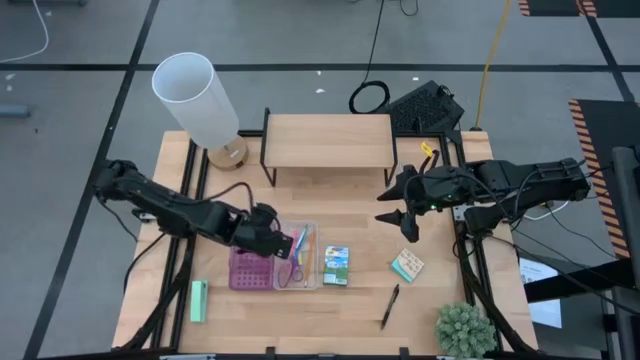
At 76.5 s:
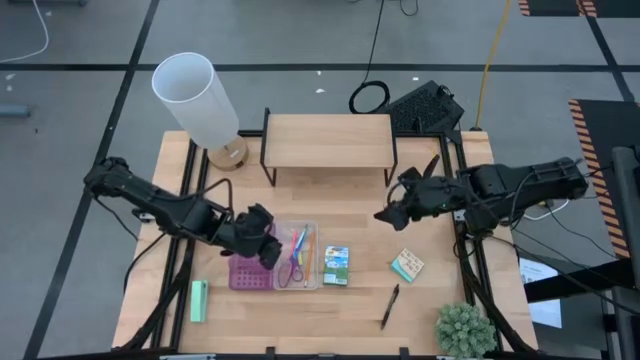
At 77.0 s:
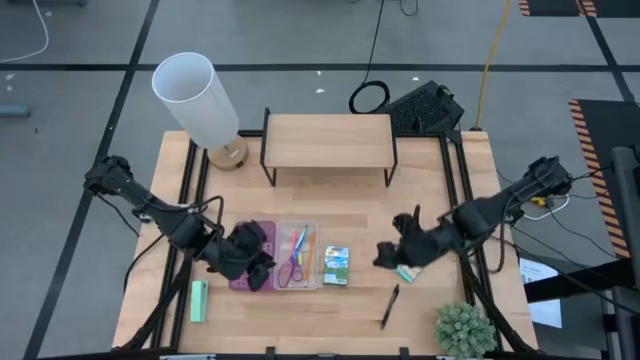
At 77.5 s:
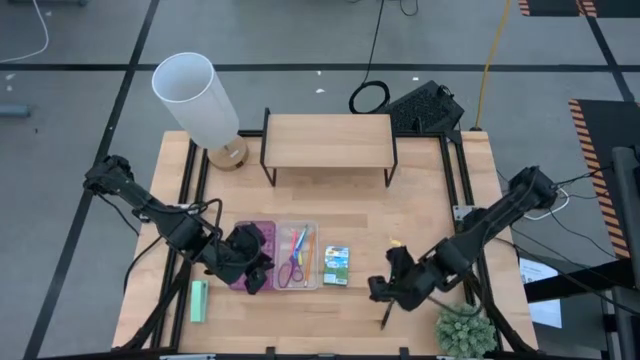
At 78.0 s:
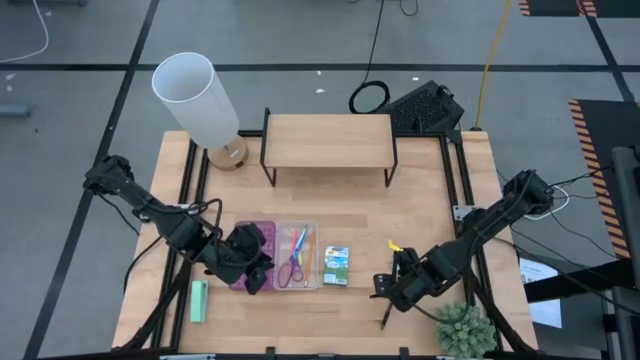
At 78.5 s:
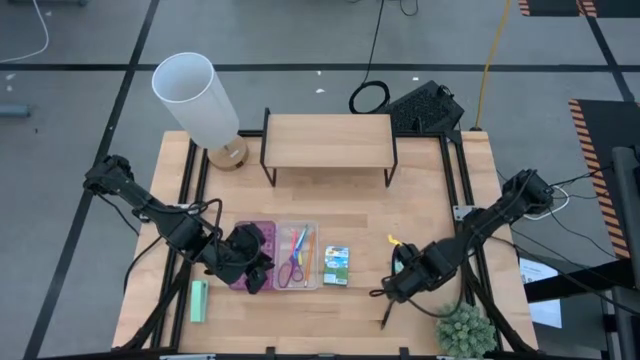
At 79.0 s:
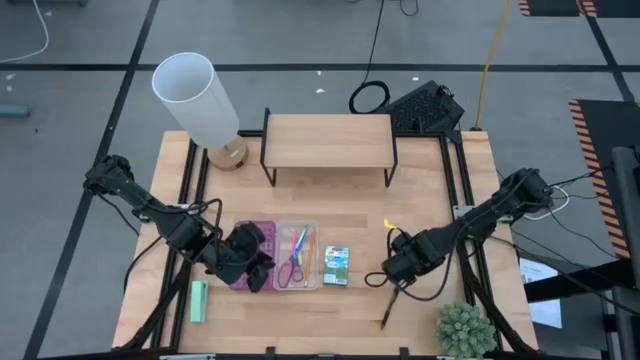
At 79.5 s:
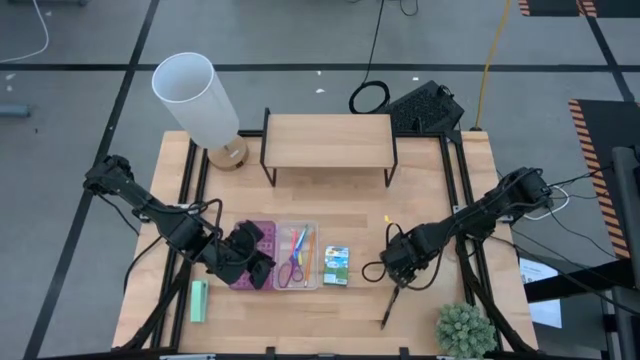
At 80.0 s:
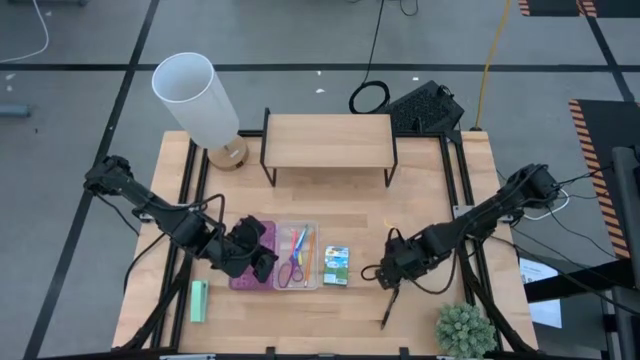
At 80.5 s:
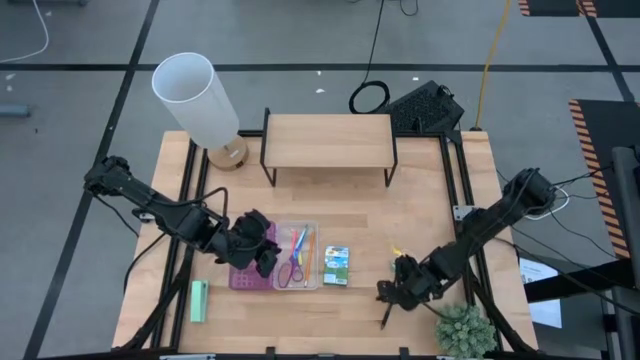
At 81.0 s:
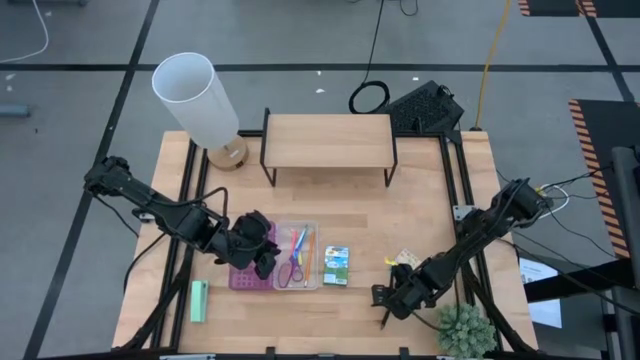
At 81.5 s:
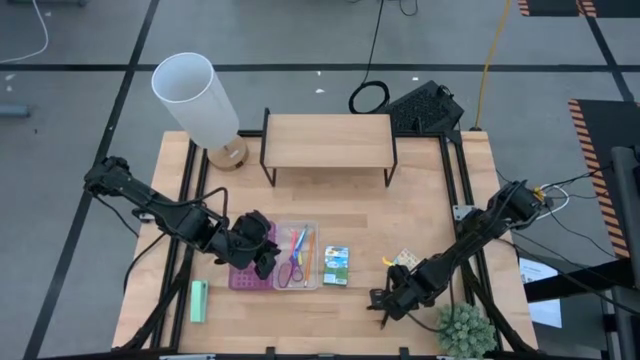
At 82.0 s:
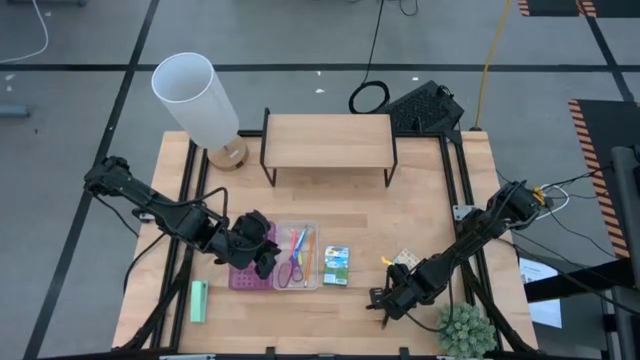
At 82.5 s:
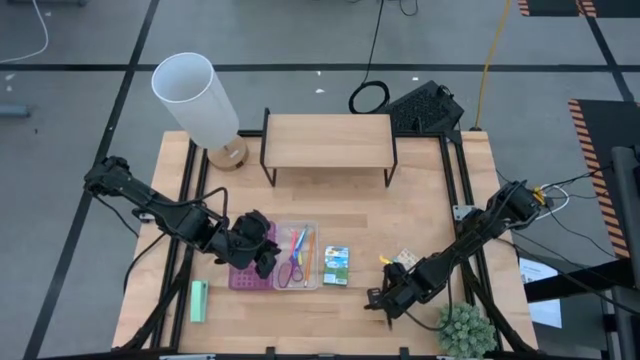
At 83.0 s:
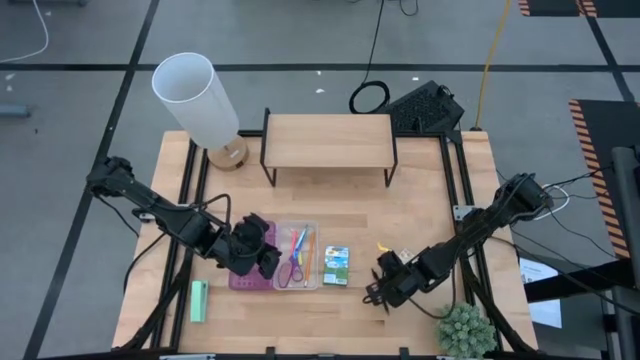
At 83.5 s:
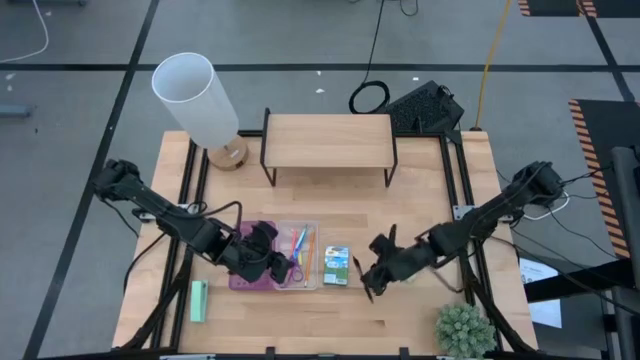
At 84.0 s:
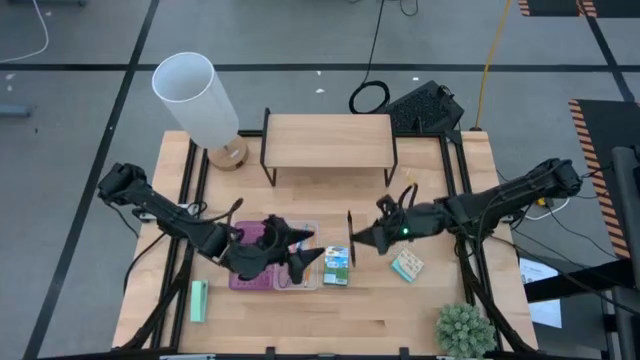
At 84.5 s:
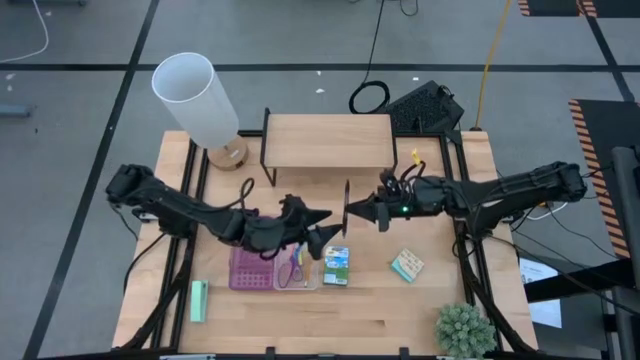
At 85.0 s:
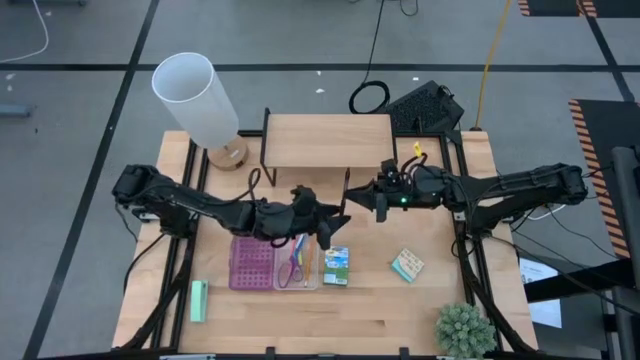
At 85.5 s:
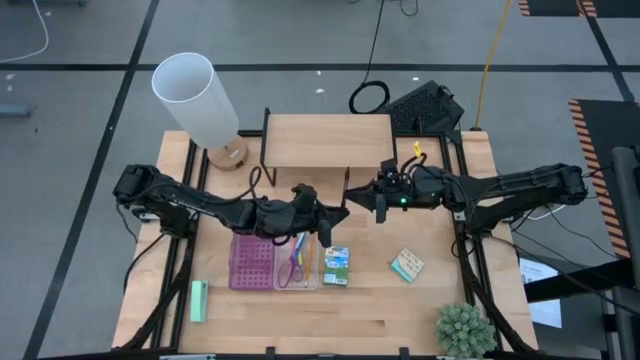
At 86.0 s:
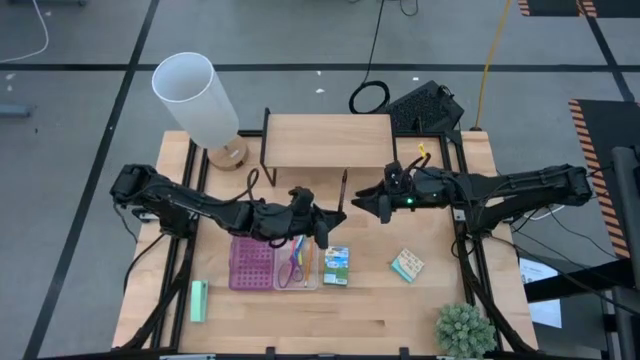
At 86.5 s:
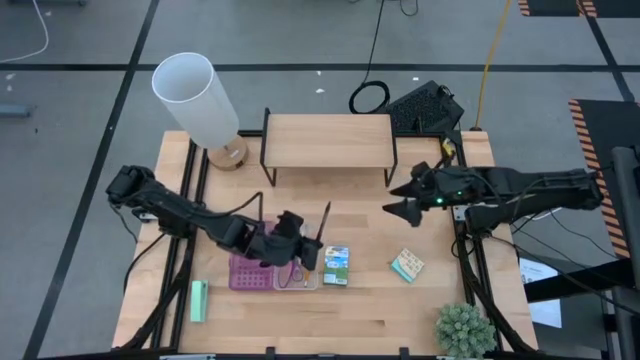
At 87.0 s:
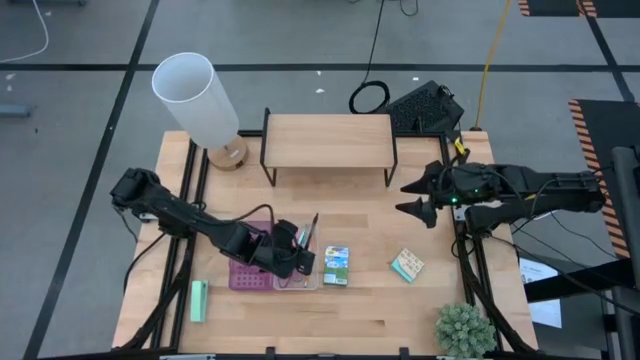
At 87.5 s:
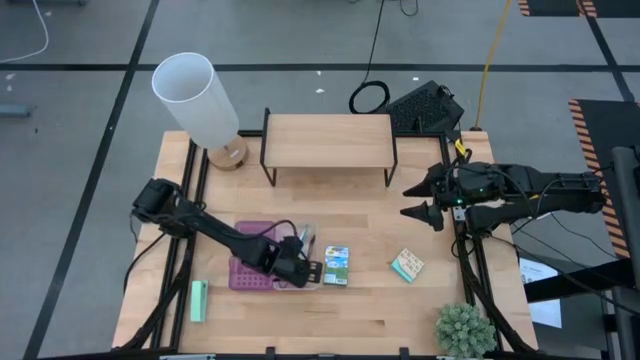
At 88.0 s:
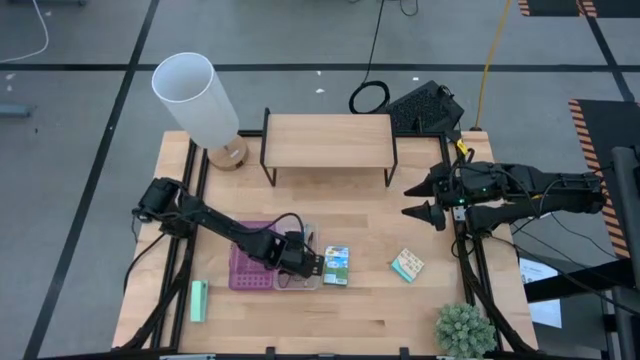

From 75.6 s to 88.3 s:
Task: Pack school essentials
Put the black pen into the violet supply box
